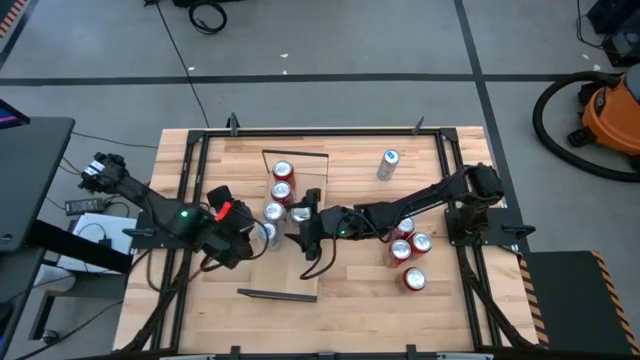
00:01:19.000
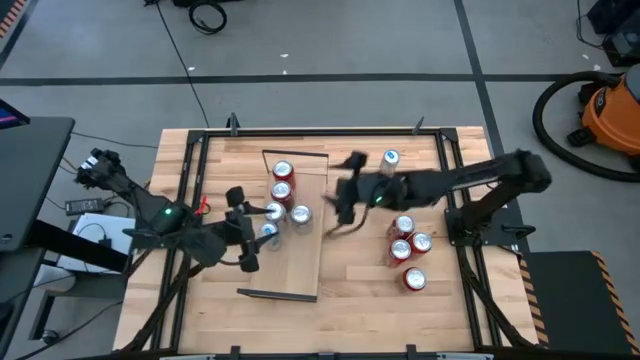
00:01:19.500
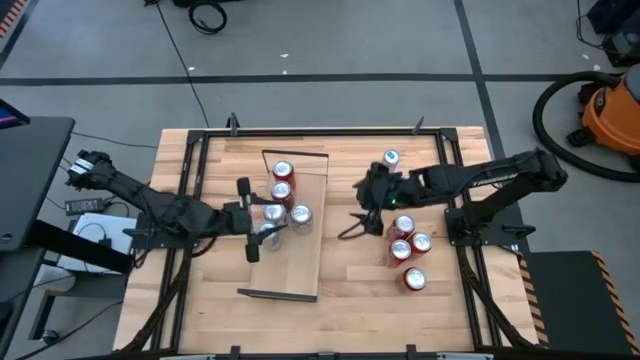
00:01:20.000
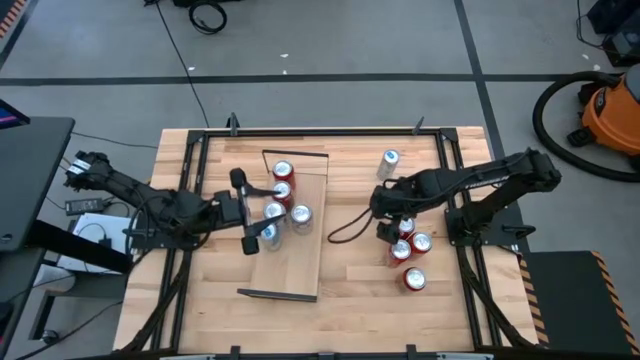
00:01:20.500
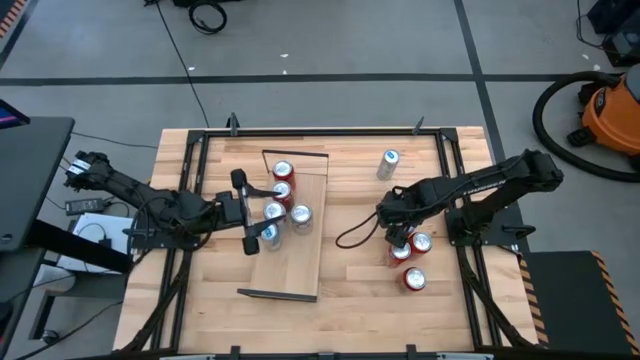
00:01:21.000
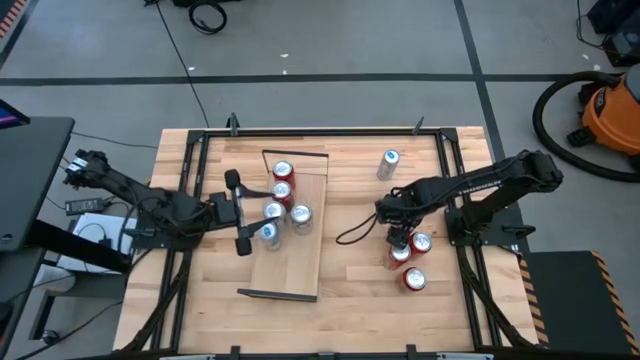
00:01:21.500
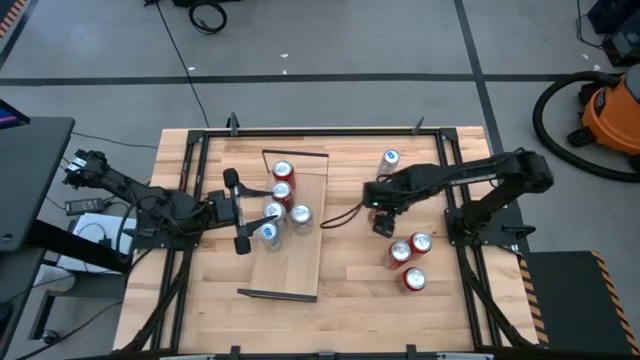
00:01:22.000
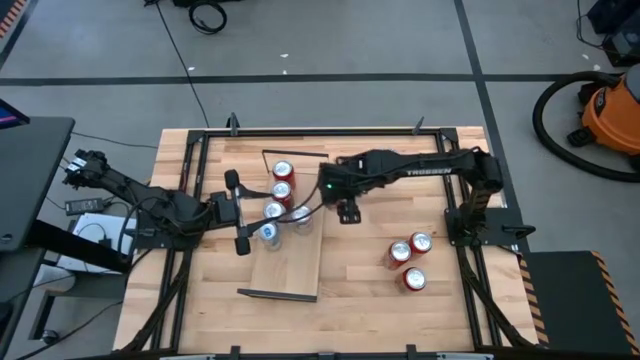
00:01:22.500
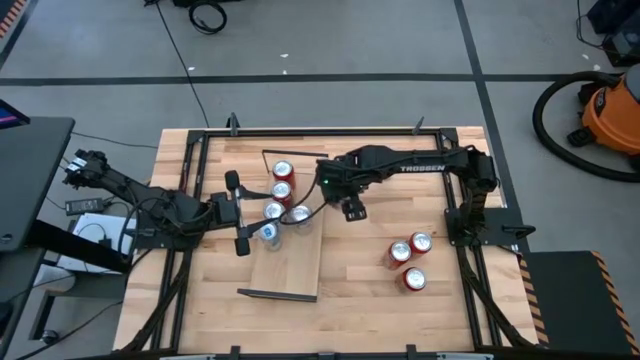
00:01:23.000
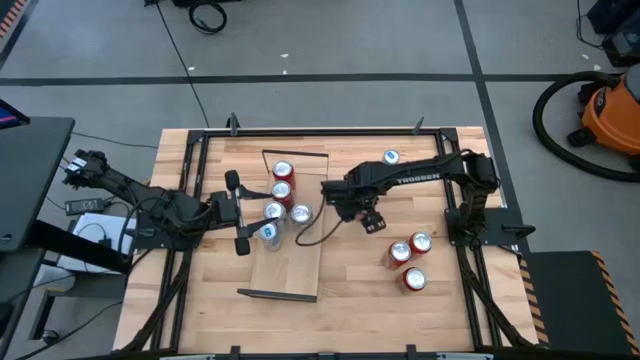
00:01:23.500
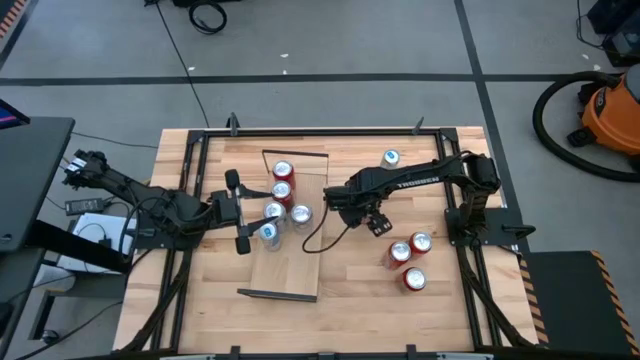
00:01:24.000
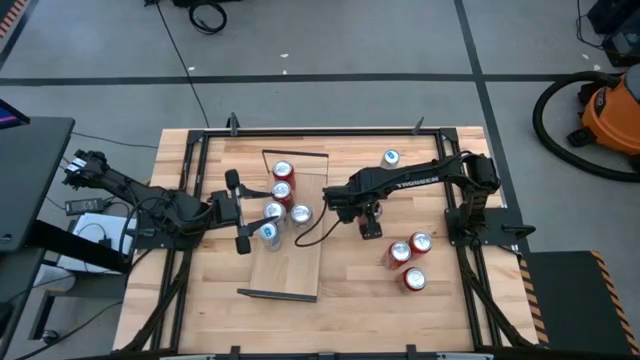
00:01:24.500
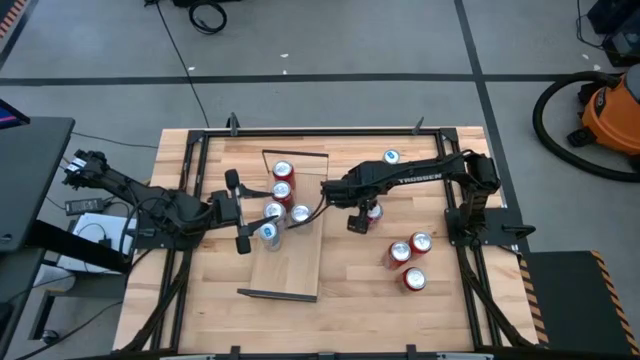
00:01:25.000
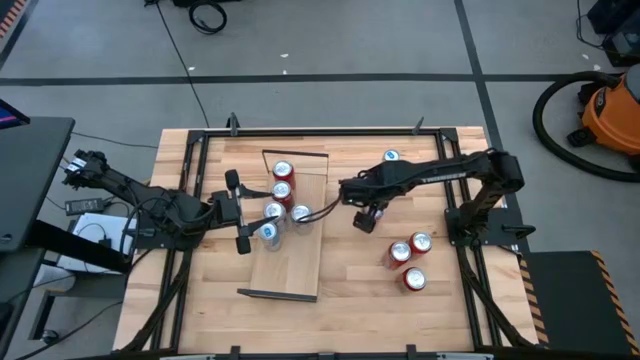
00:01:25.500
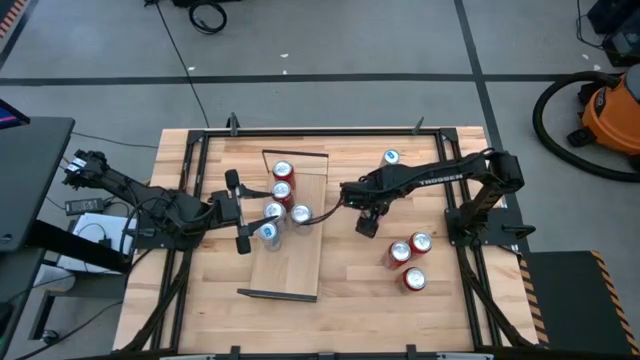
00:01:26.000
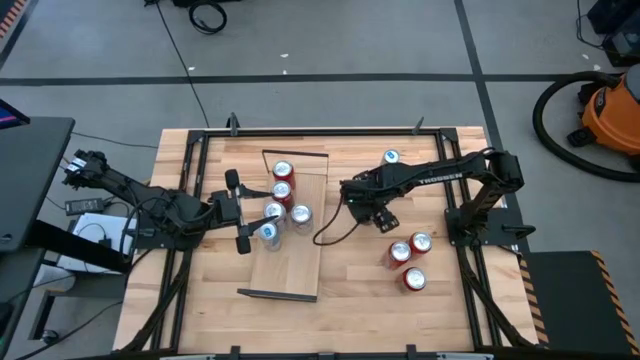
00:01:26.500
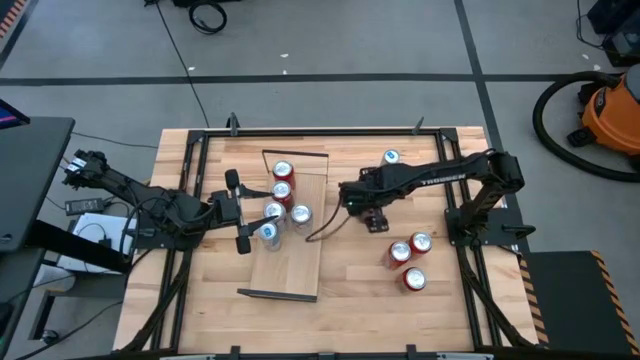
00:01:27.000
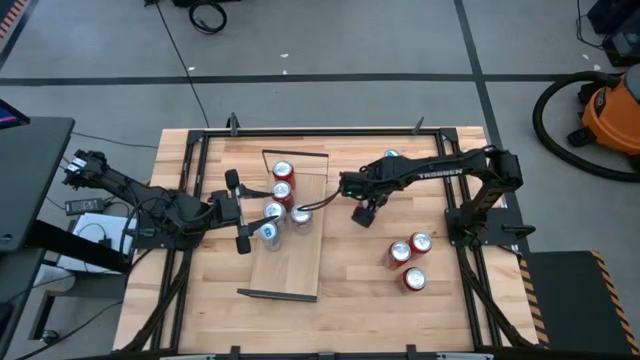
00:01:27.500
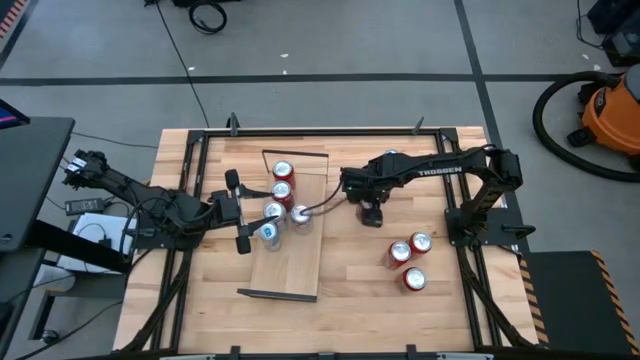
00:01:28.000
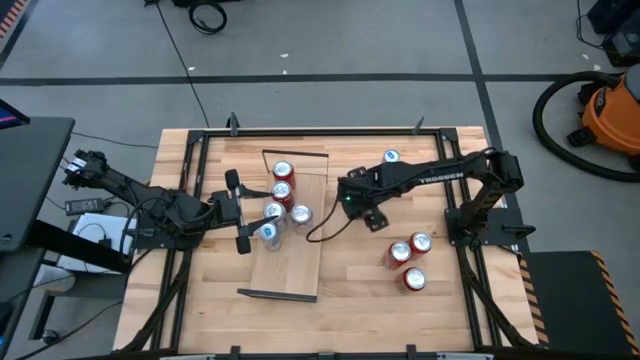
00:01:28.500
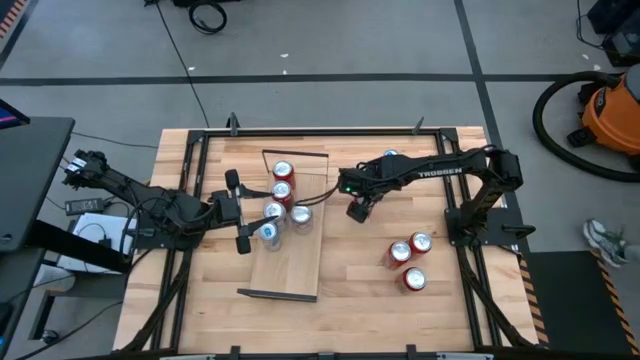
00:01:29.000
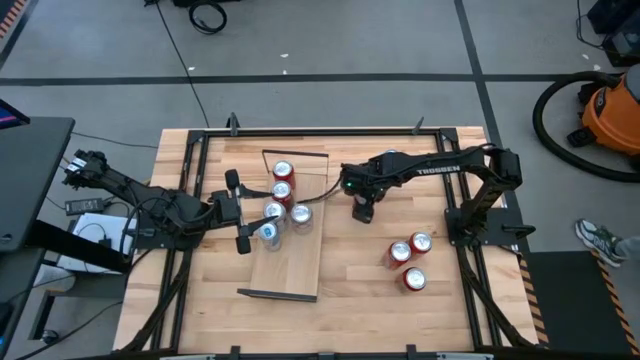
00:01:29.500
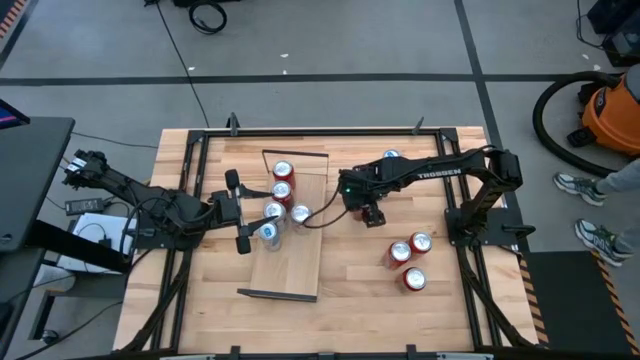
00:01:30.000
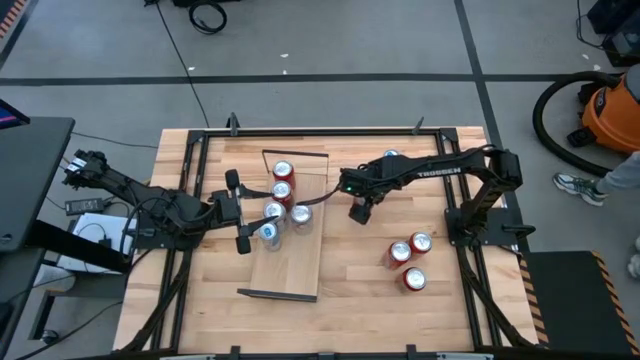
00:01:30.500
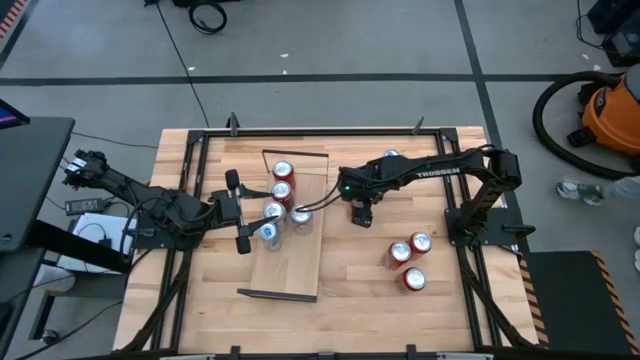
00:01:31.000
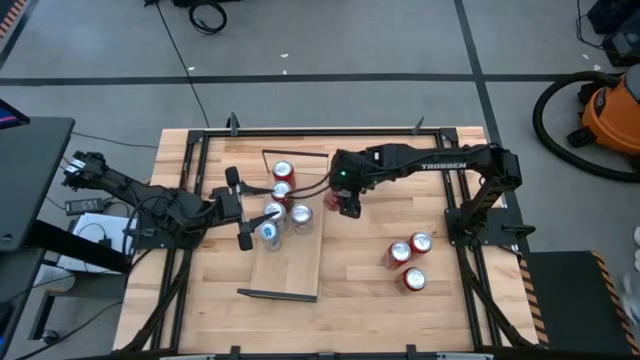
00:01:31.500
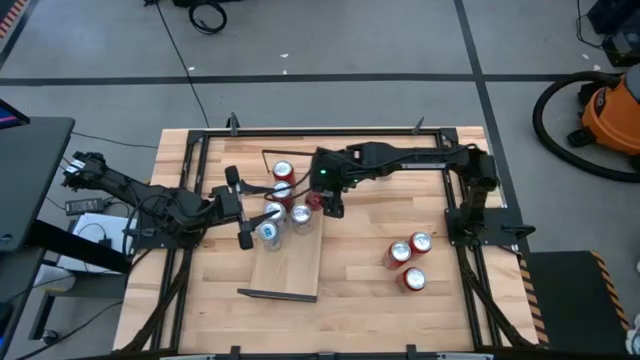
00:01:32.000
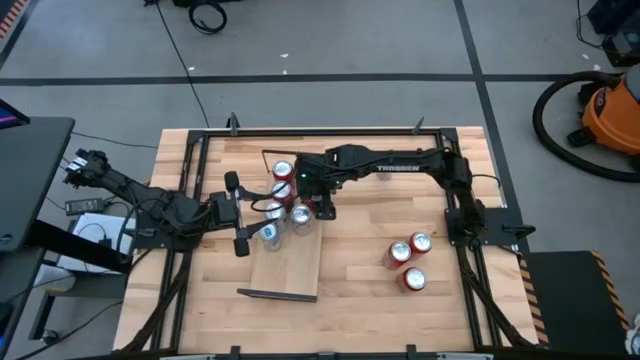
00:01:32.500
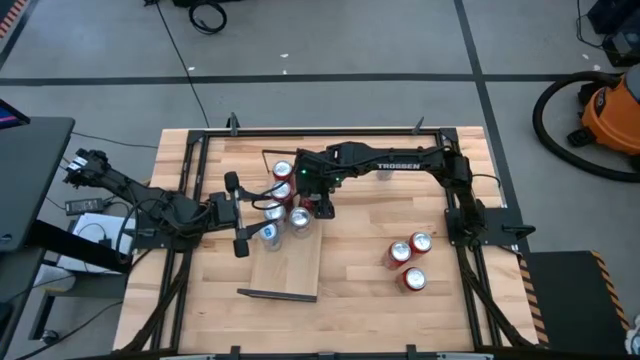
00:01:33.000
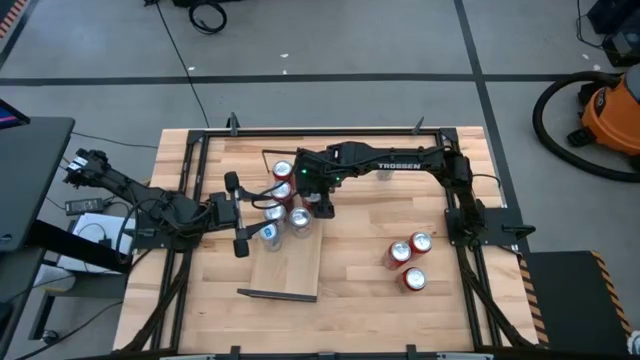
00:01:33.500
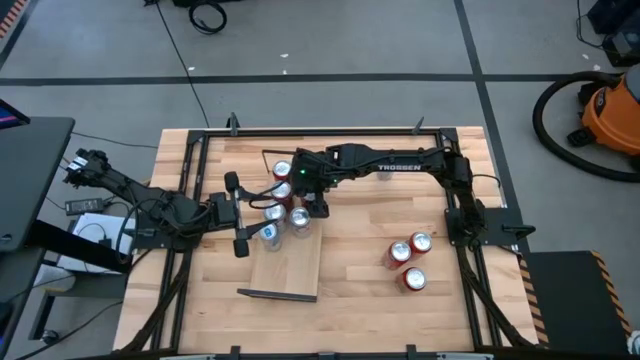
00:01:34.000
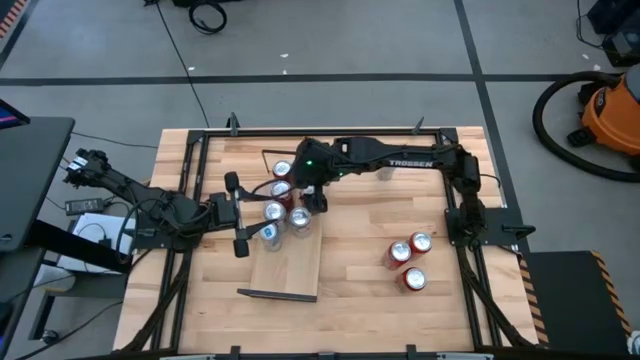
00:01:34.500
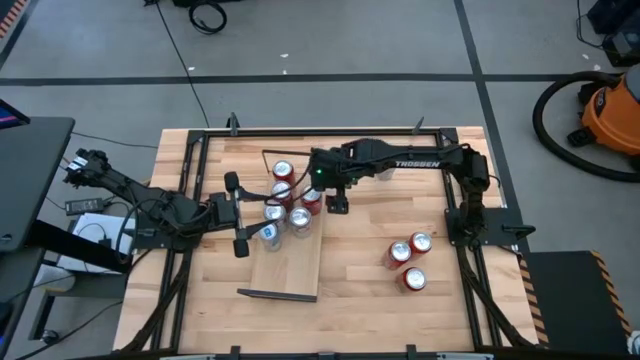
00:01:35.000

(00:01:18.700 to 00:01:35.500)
Task: Place canned beverage on shelf
Put the red white soda can on the shelf aligned with the red white soda can

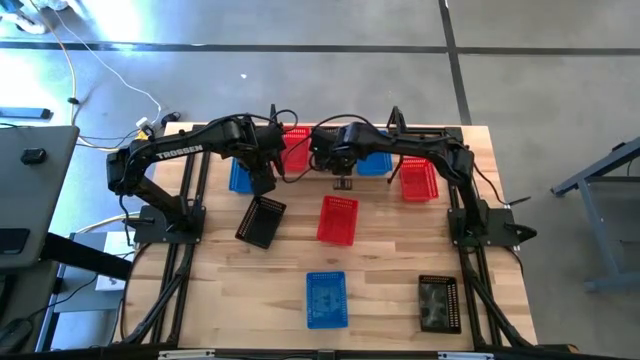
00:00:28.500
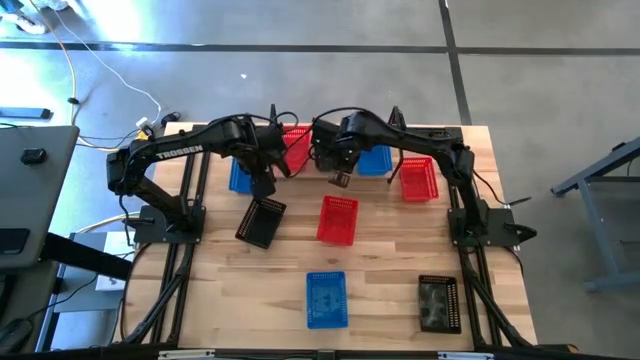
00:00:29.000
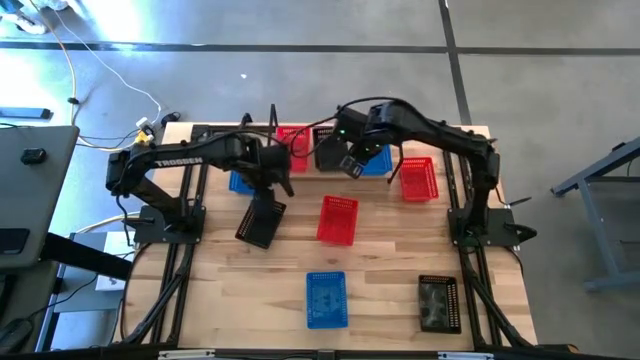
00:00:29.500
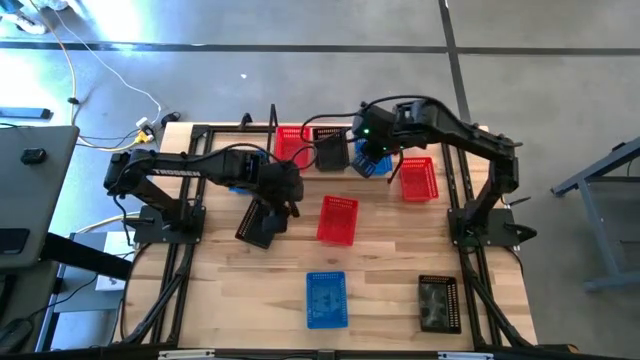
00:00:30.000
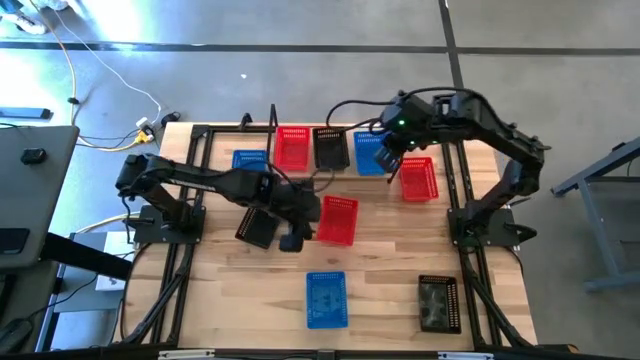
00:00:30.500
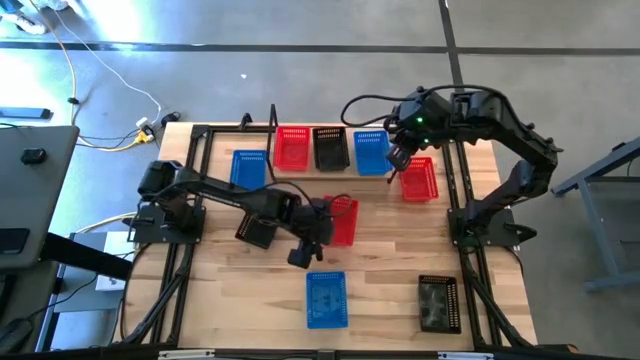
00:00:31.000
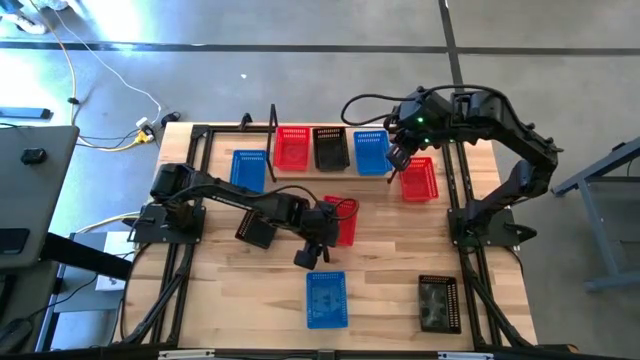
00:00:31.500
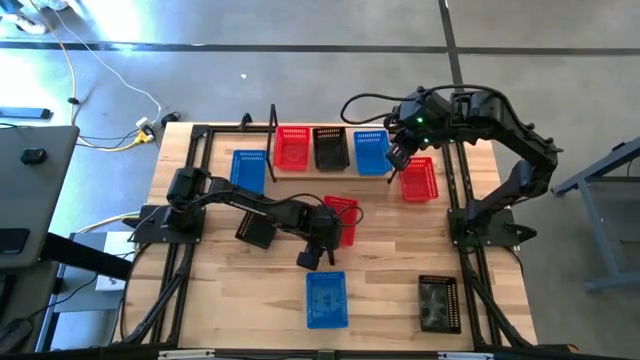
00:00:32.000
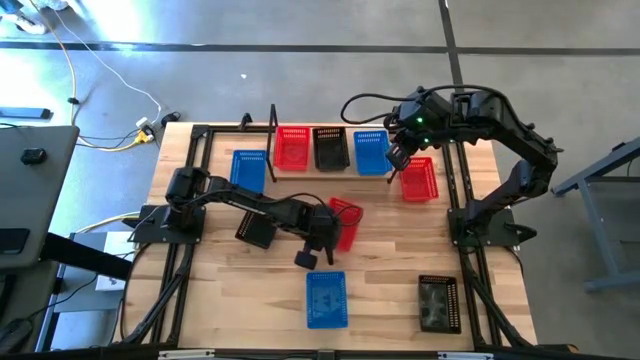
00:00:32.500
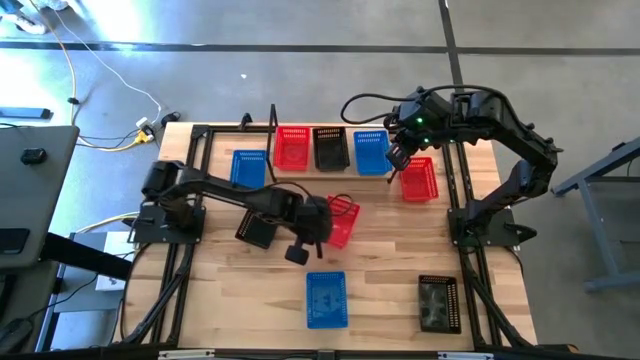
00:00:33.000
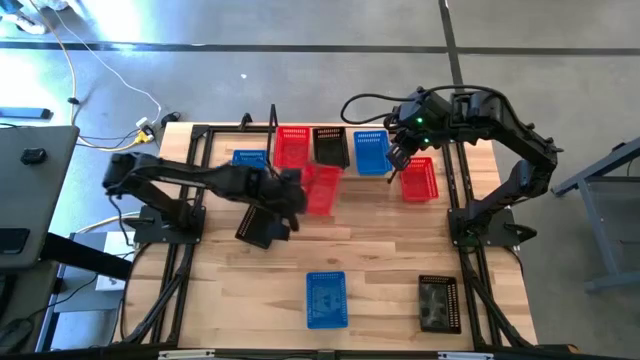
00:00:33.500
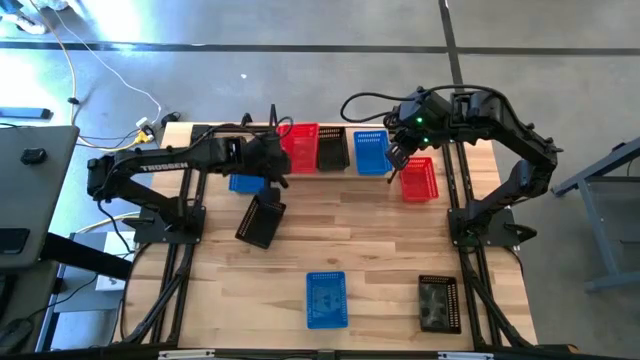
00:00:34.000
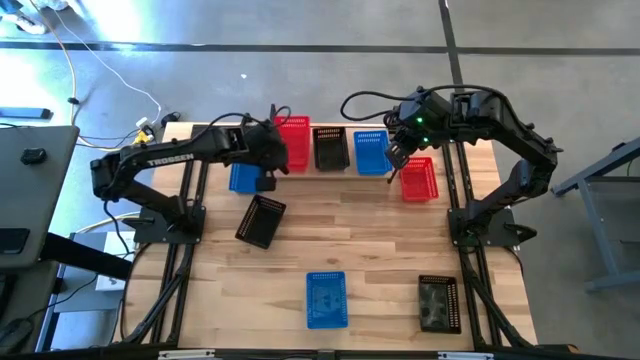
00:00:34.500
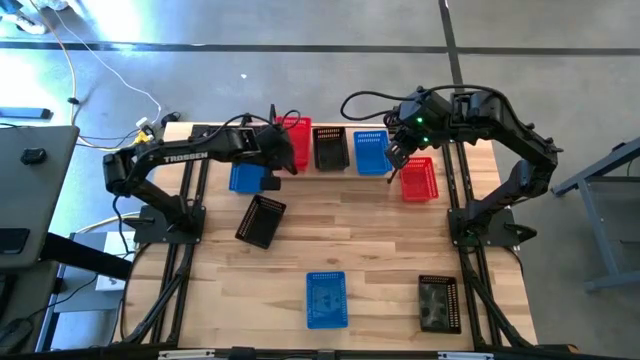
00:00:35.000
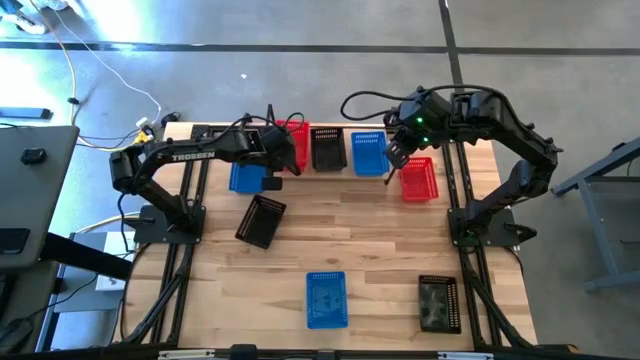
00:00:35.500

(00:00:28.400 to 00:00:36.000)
Task: Stack baskets on shelf by color
Stack the bottom red basket on top of the red basket on the shelf
